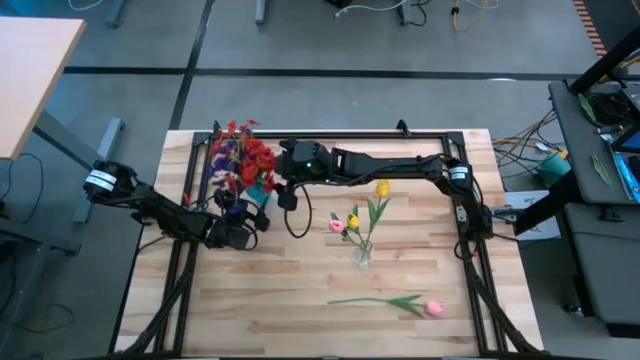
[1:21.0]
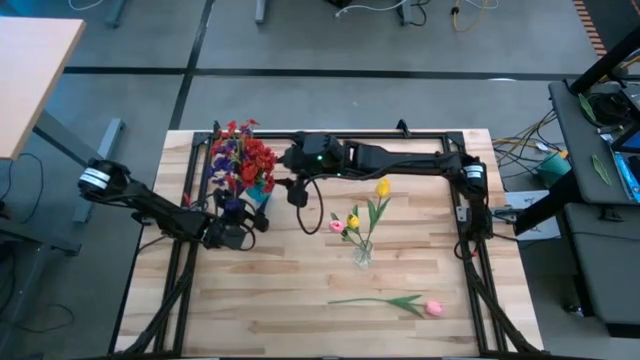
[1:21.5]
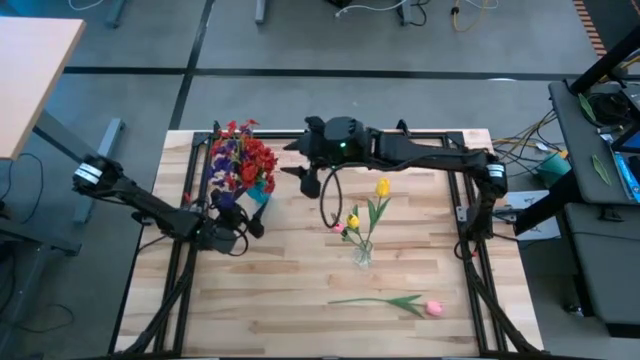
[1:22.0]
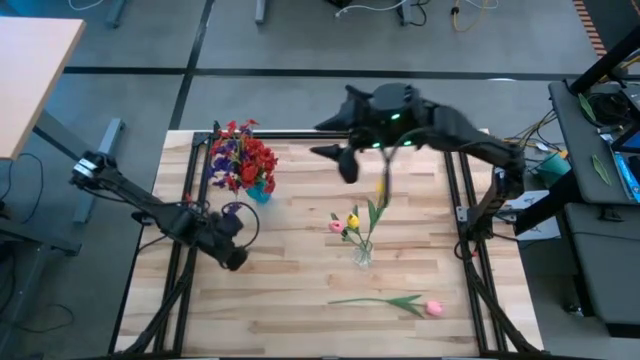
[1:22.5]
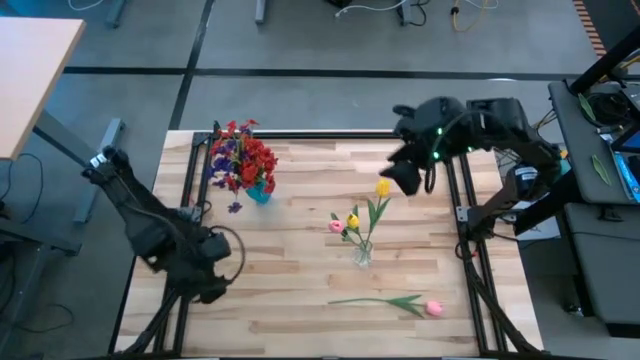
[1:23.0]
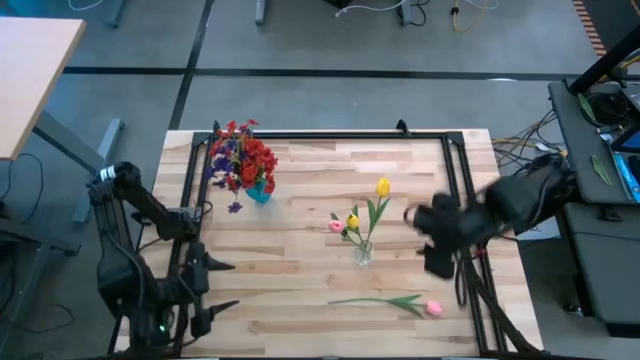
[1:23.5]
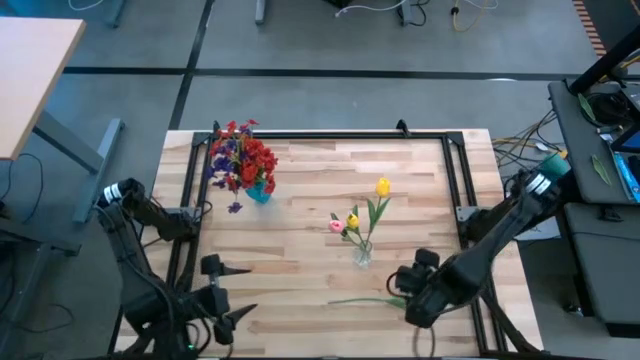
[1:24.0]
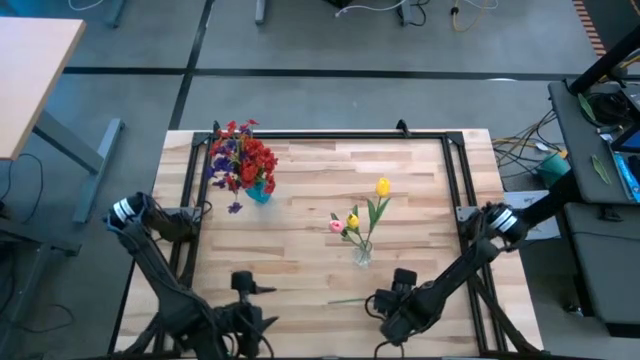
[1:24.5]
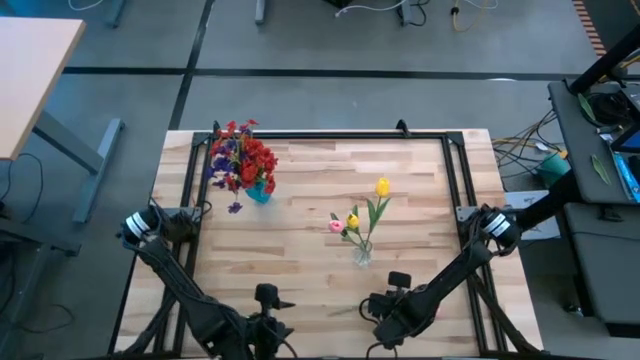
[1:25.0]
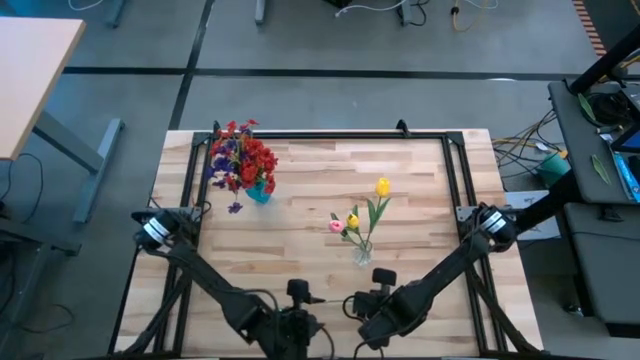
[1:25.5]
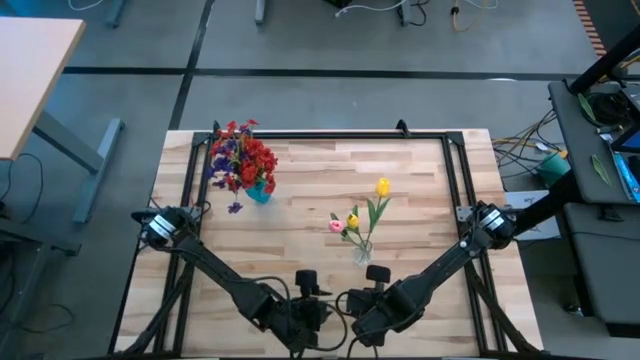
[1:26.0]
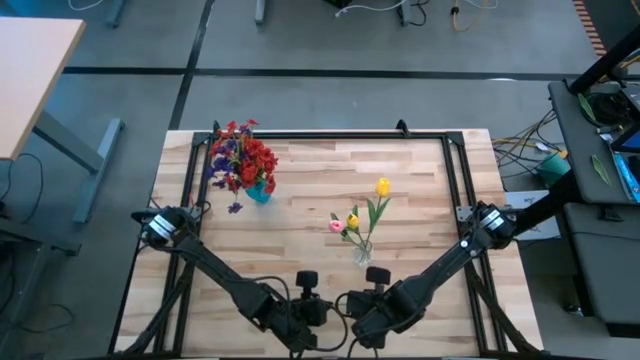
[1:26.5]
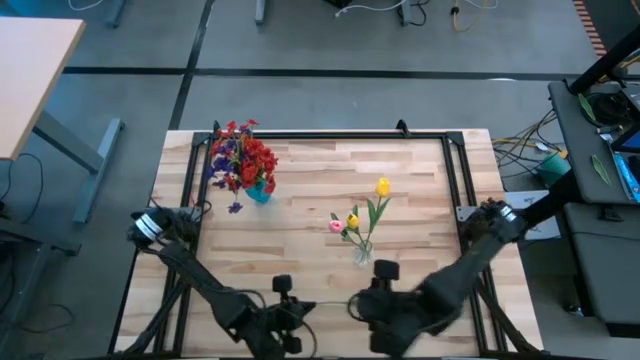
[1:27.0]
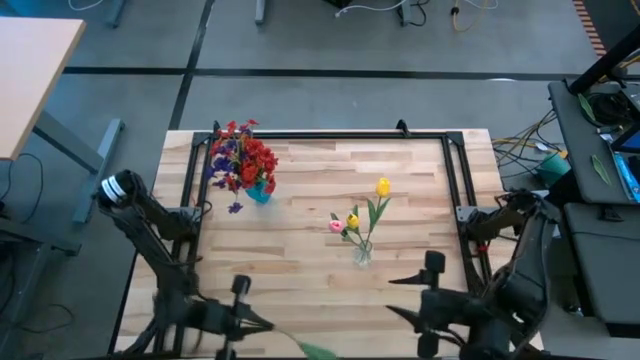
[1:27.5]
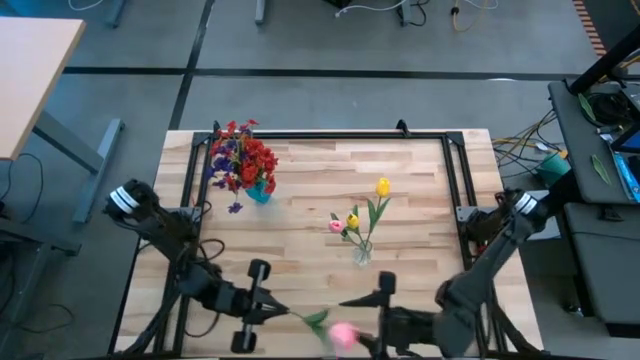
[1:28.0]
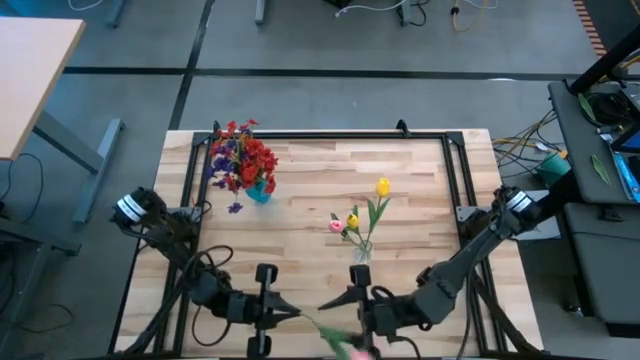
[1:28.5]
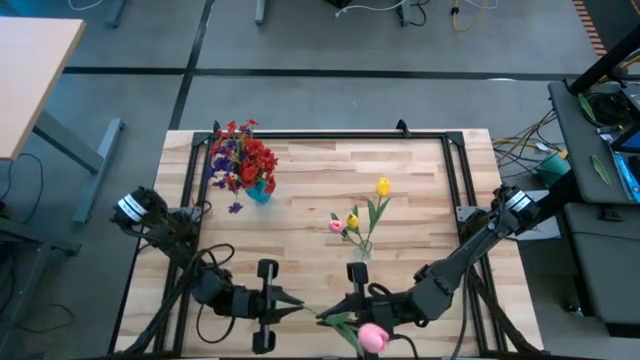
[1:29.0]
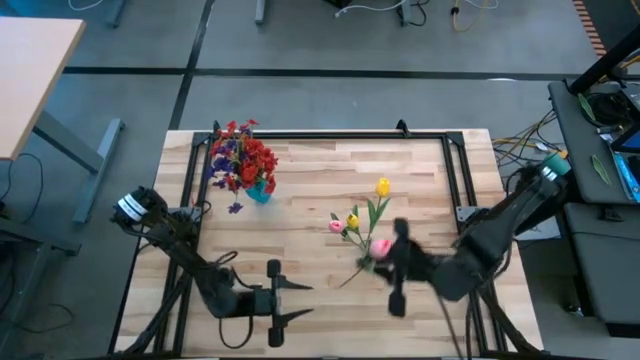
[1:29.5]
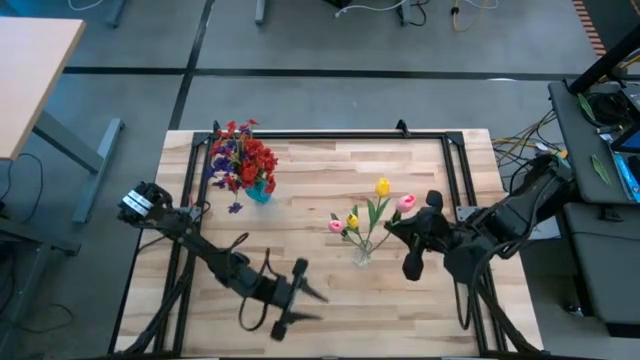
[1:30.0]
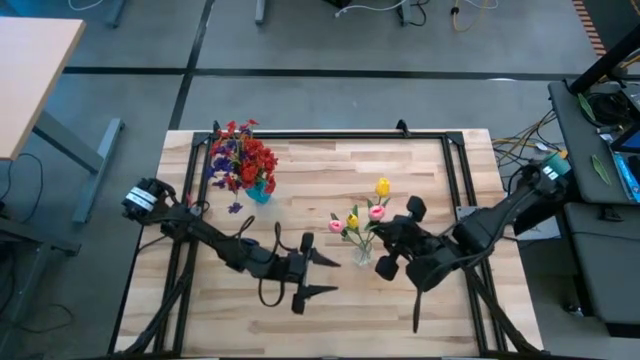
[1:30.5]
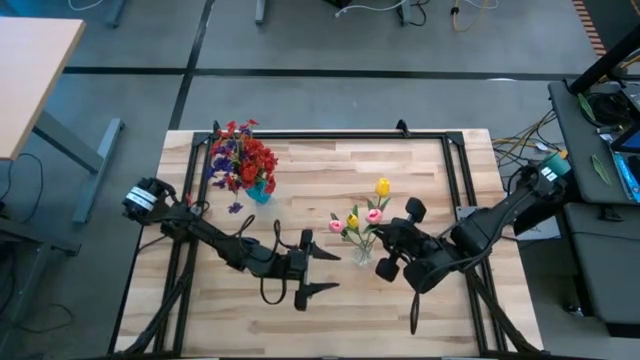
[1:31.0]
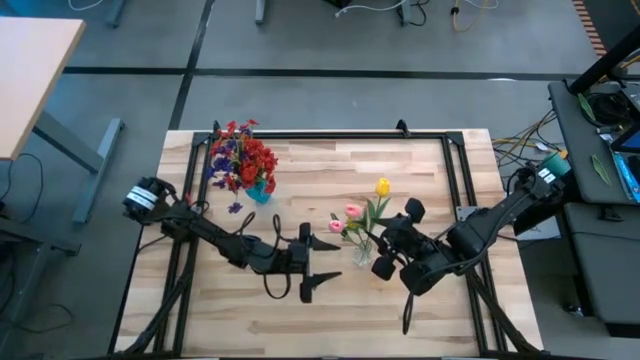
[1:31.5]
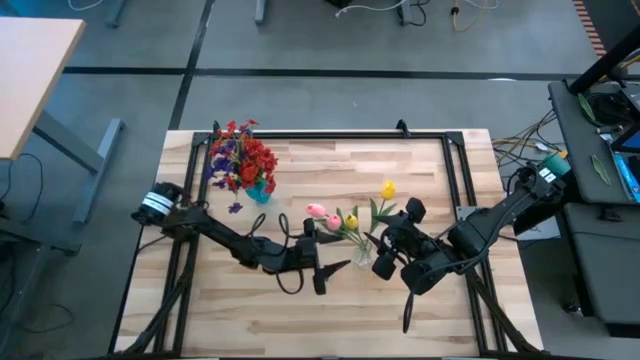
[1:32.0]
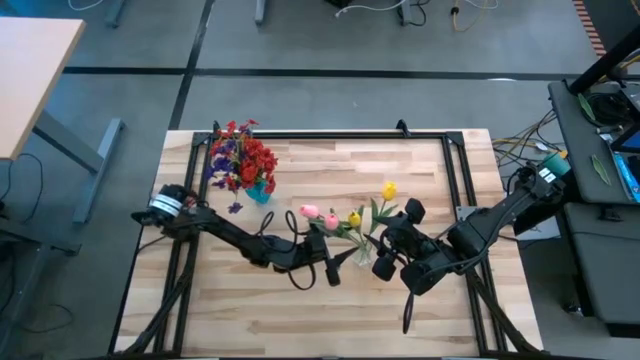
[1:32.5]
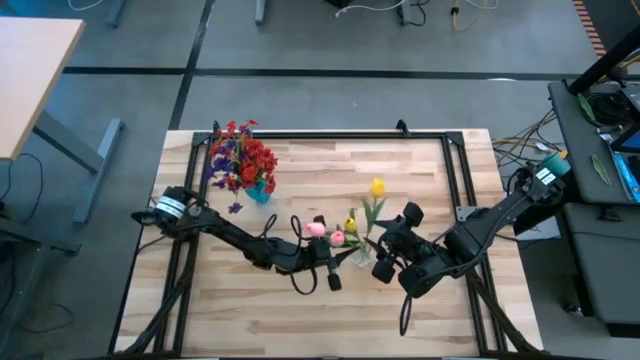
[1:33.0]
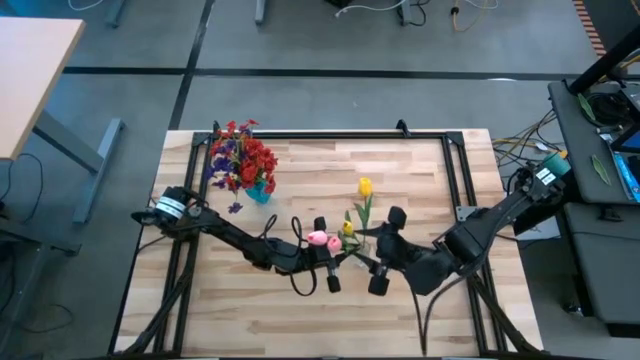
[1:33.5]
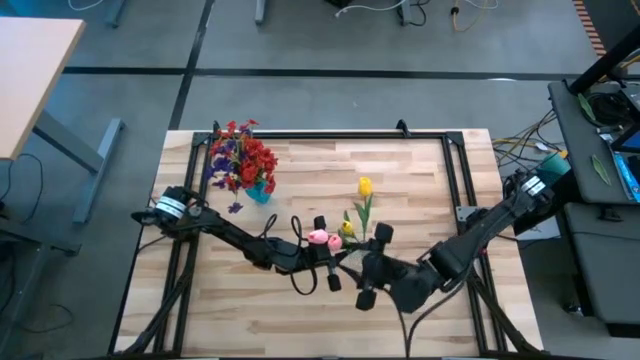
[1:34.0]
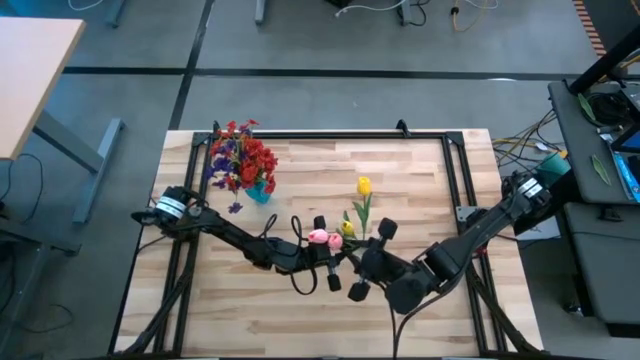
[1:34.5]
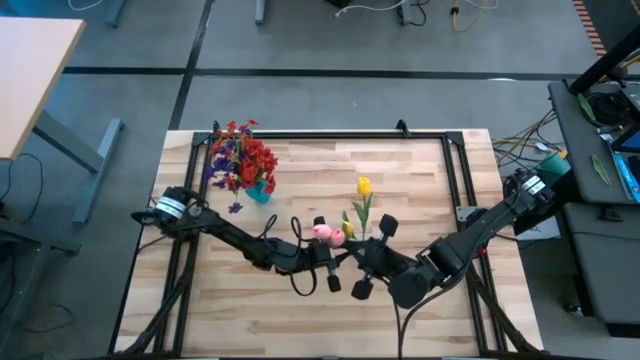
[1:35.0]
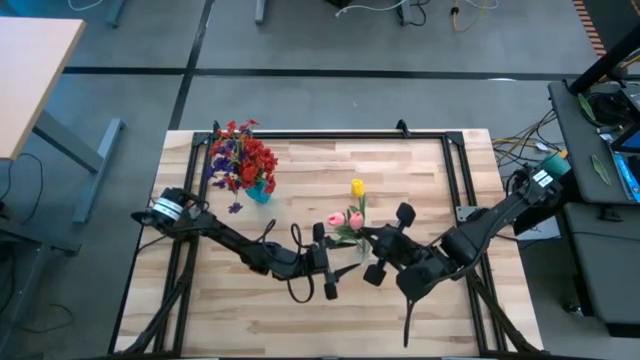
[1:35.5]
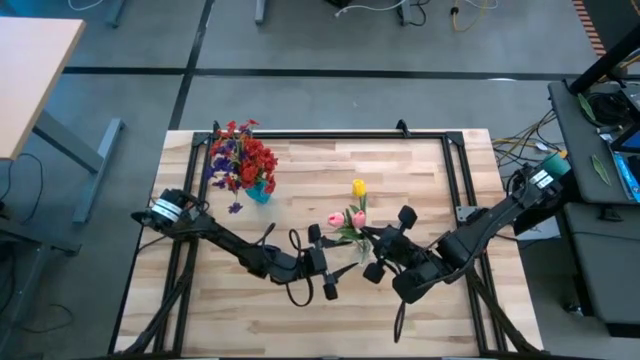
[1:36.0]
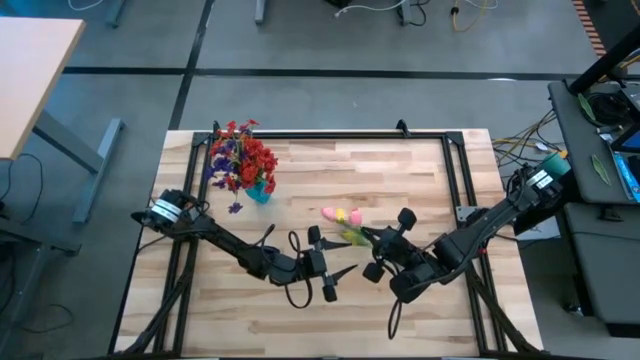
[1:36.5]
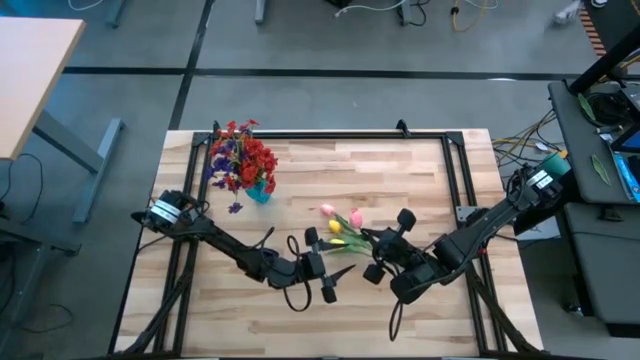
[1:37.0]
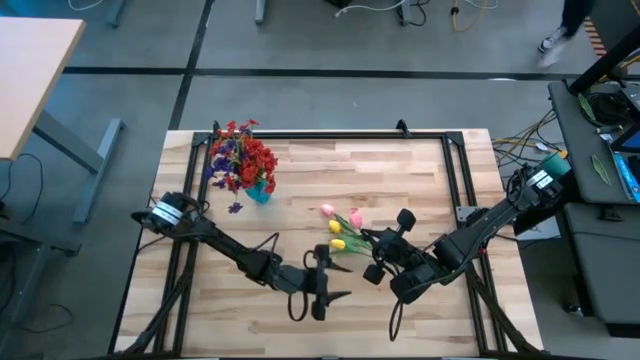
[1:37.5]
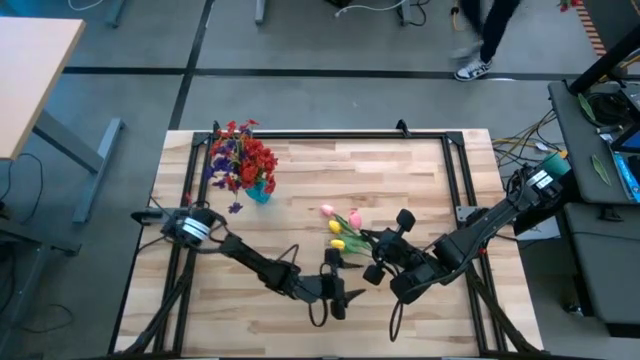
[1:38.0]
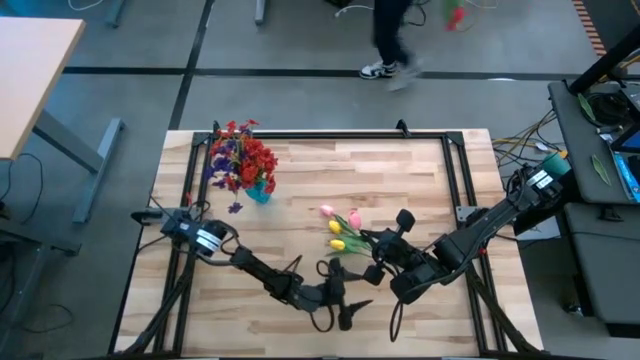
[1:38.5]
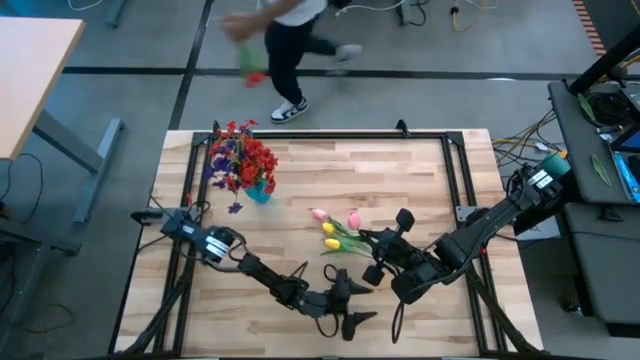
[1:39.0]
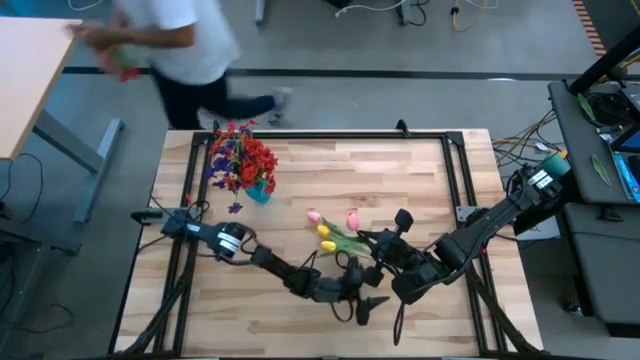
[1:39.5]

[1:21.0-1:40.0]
Task: Sort flowers into vase by color
Put the pink tulip into the transparent vase

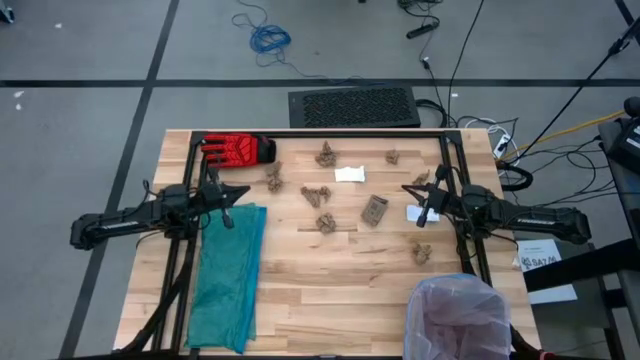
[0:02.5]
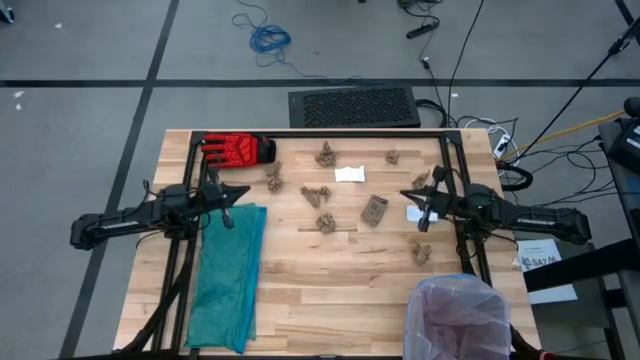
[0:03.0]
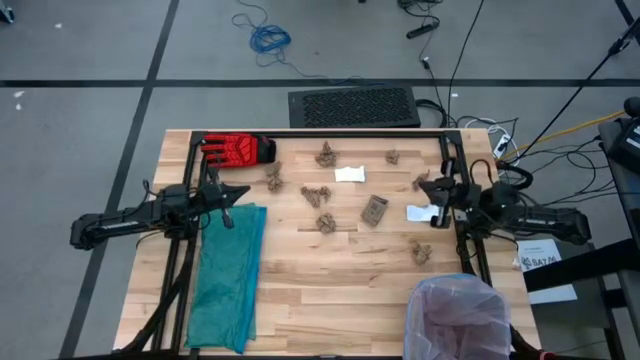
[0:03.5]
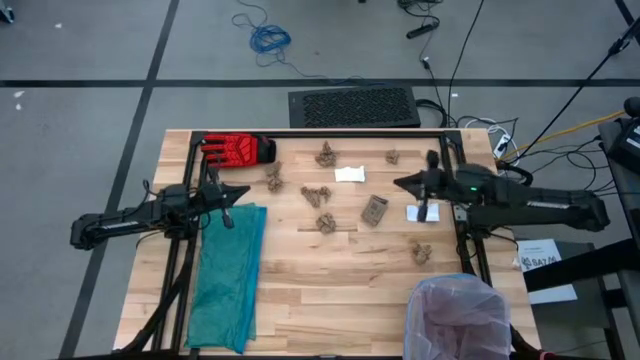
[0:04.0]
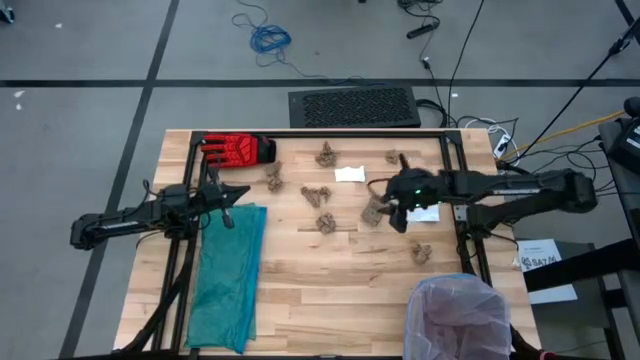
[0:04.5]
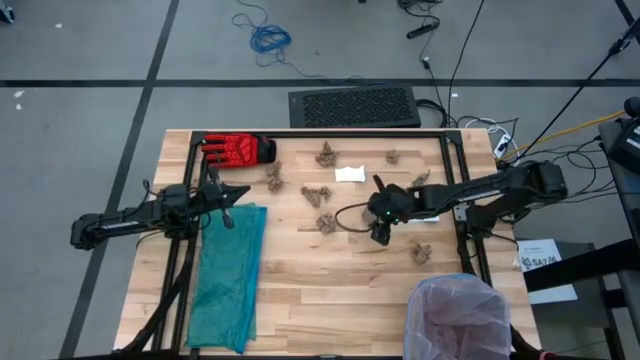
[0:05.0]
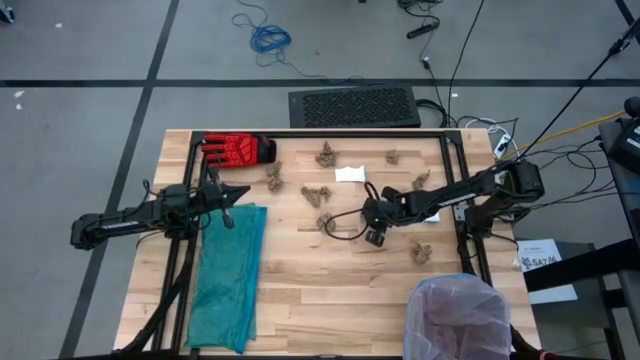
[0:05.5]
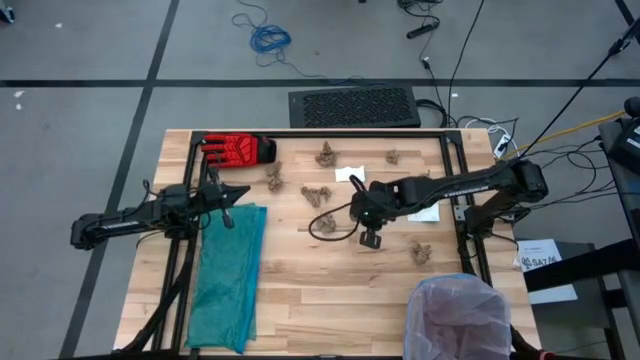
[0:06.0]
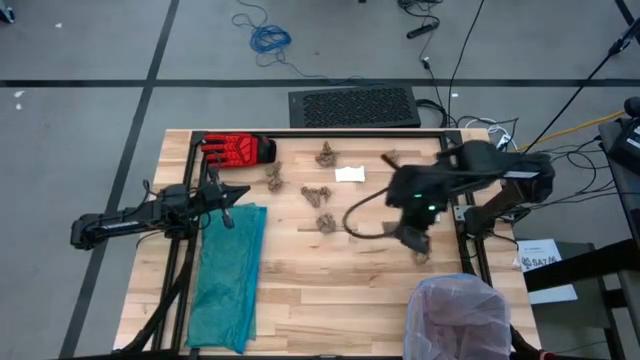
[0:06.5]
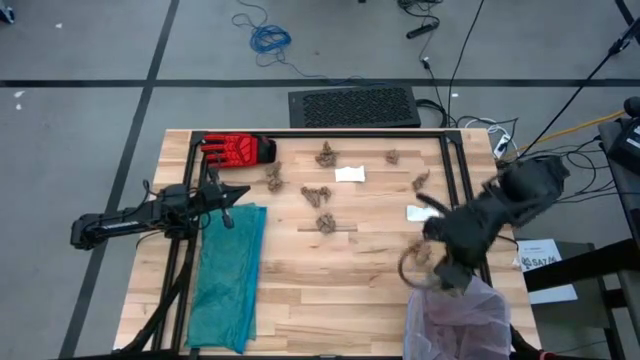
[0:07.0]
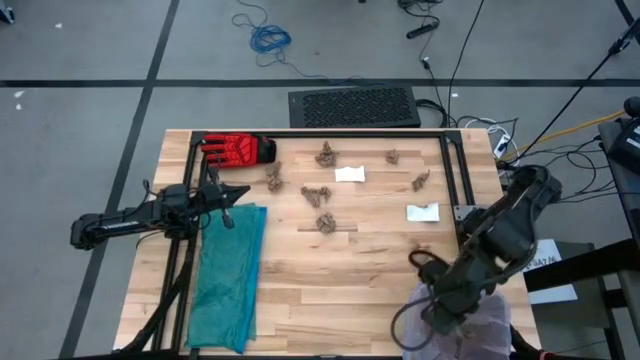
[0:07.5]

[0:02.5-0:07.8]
Task: place trash/remove bag and relplace
Put the brown coffee sleeve into the black trash bin
